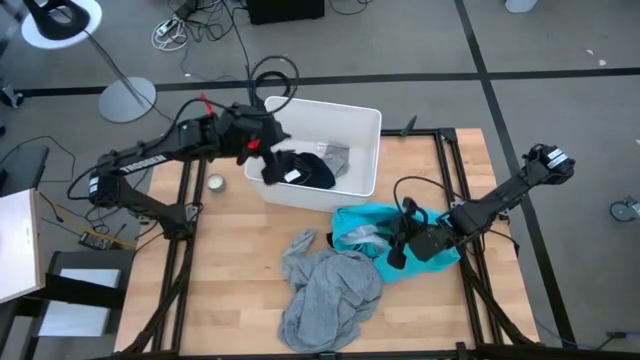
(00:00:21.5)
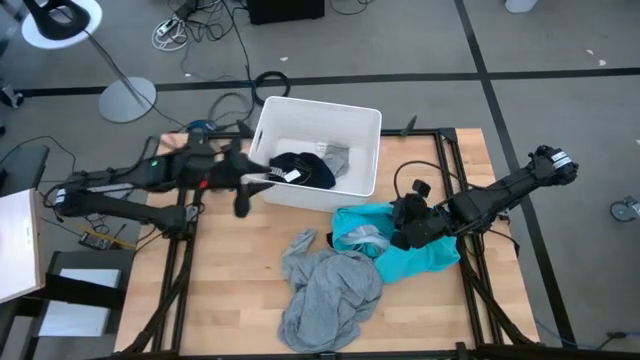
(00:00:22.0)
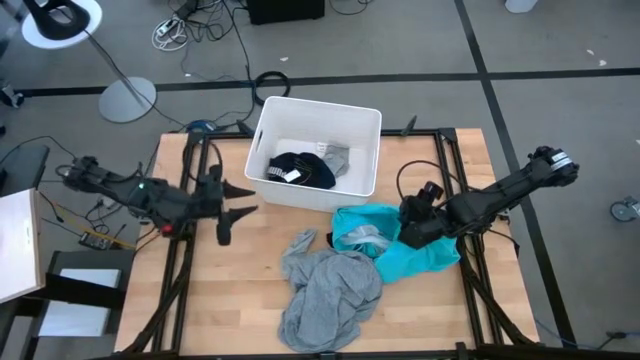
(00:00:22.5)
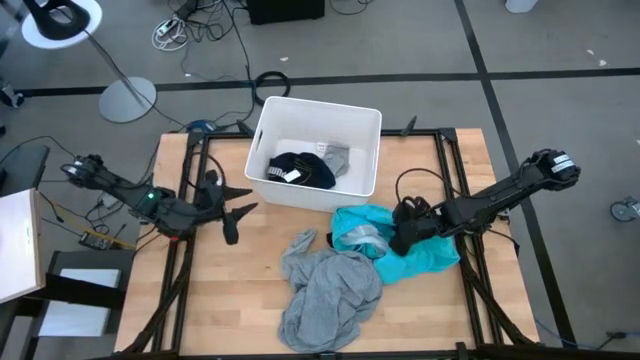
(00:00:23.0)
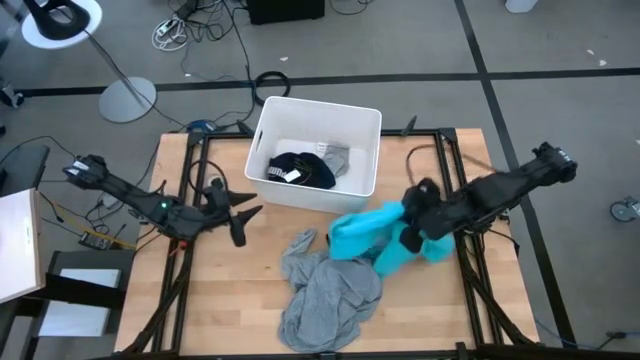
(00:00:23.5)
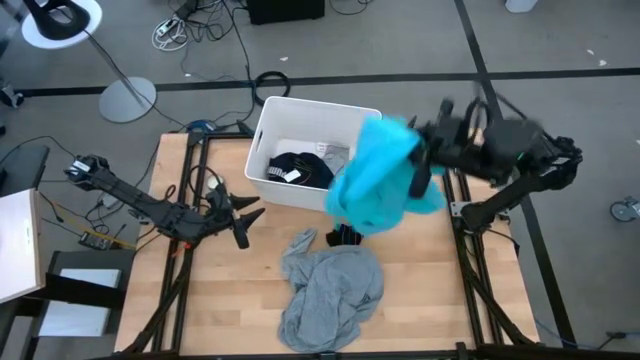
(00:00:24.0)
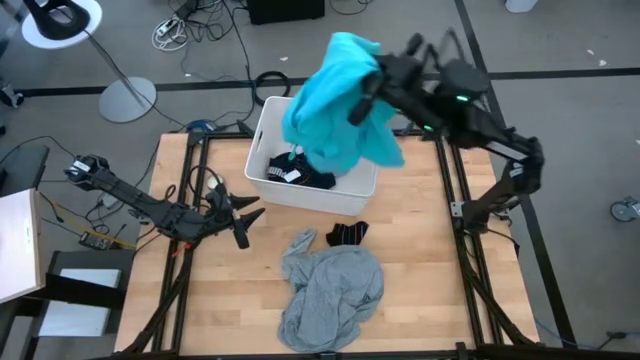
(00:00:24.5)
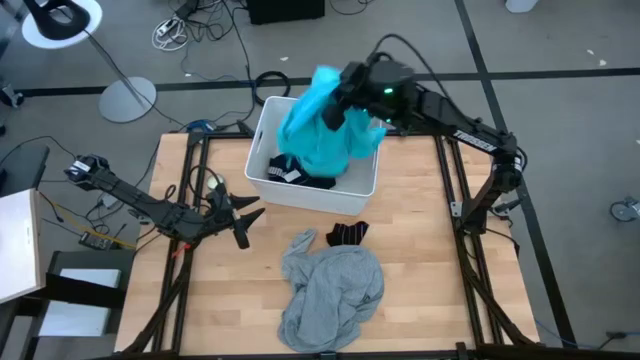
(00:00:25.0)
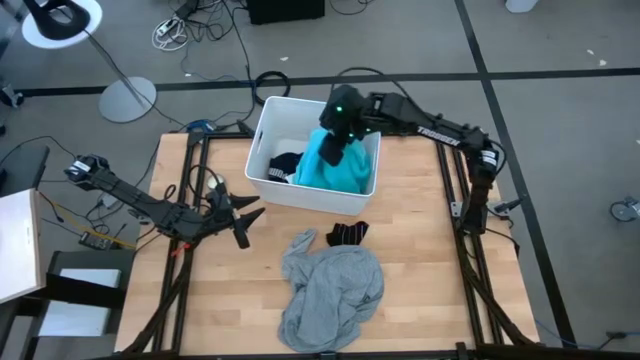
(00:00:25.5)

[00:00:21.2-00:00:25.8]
Task: Sort clothes
Put the light blue shorts into the laundry bin

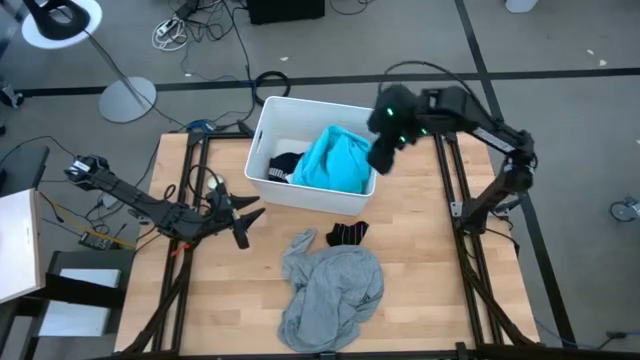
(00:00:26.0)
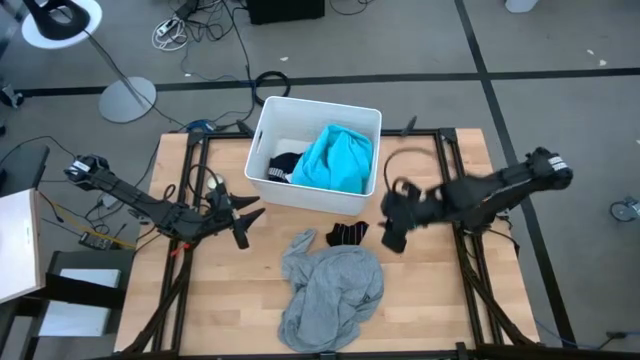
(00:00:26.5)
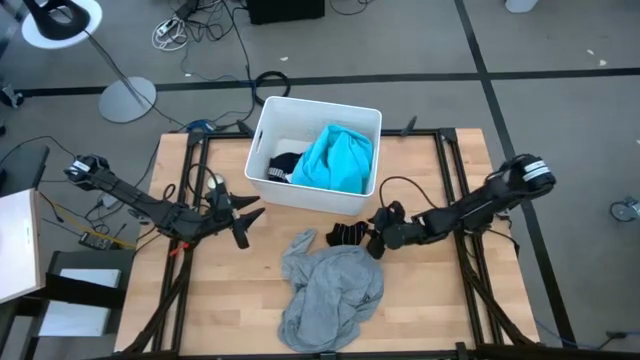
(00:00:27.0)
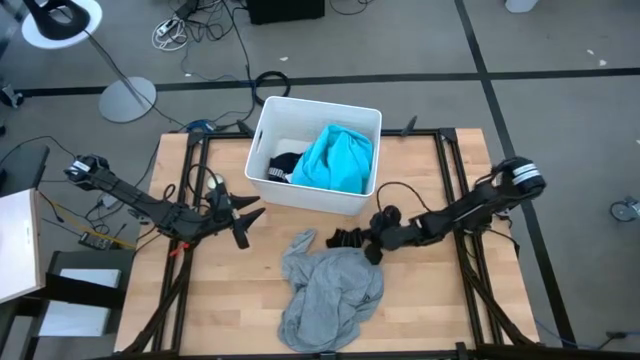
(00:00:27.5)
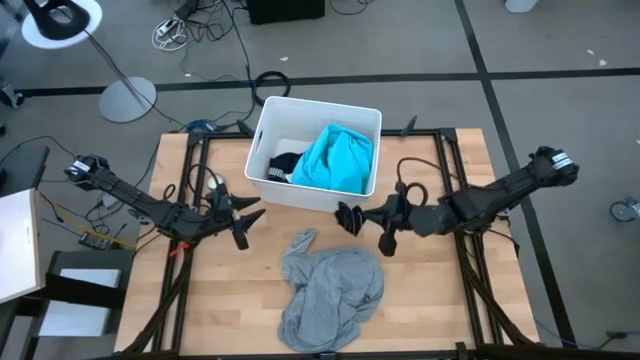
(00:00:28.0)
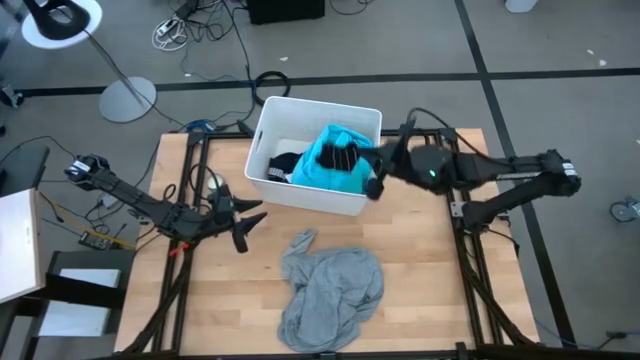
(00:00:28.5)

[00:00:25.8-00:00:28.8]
Put the black sock into the laundry bin

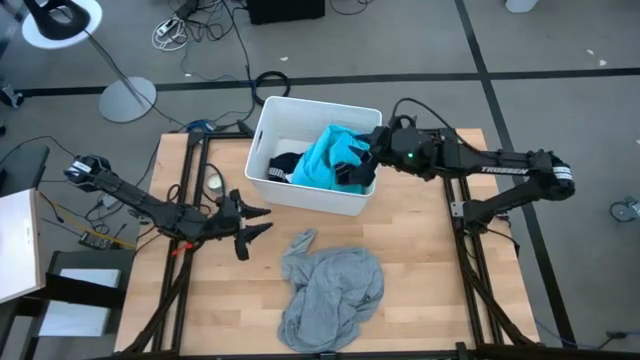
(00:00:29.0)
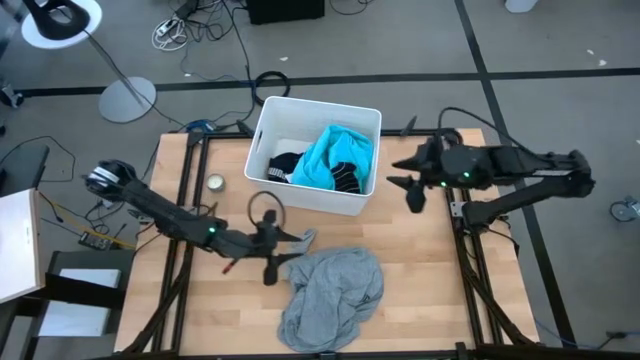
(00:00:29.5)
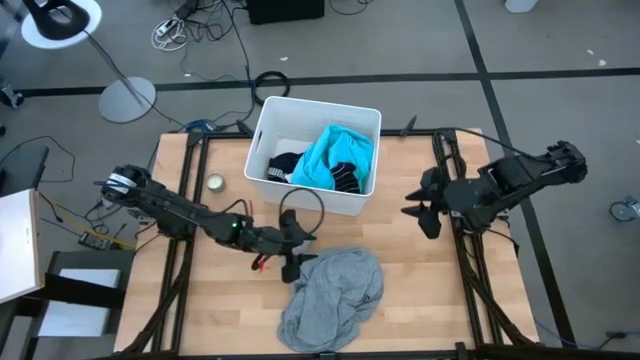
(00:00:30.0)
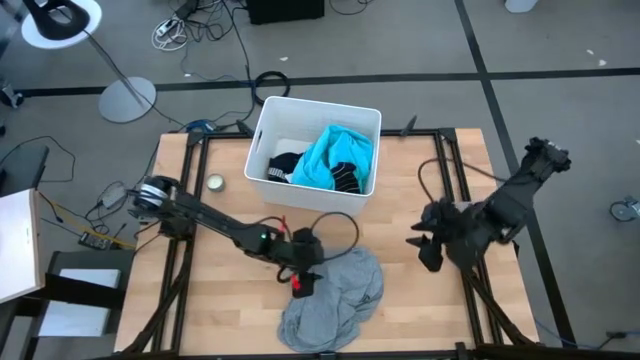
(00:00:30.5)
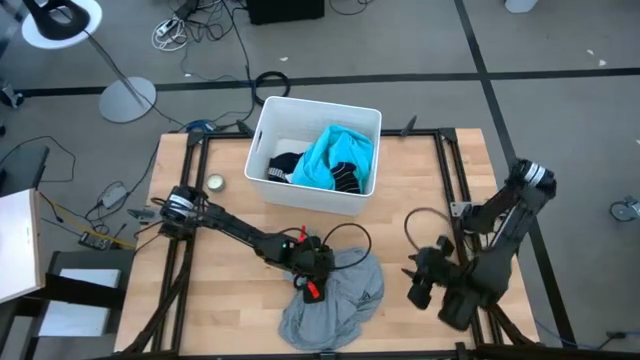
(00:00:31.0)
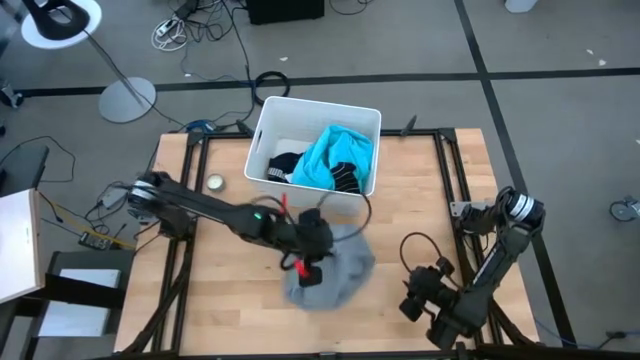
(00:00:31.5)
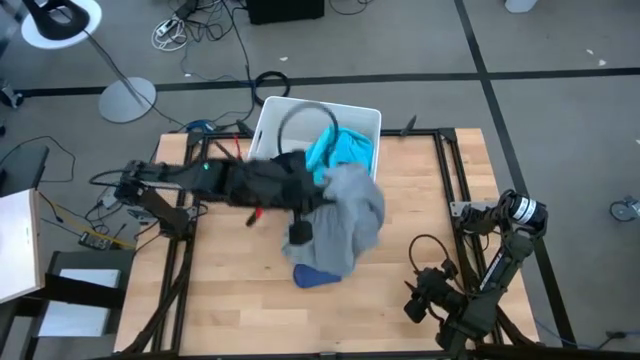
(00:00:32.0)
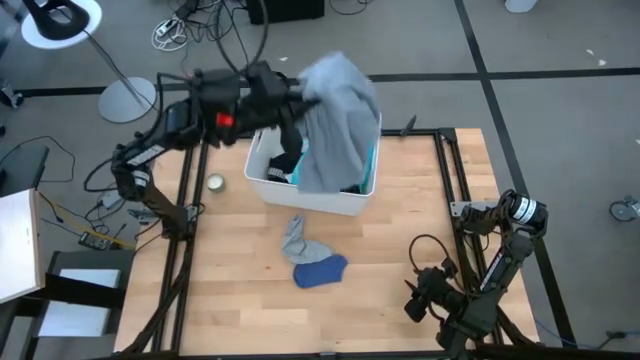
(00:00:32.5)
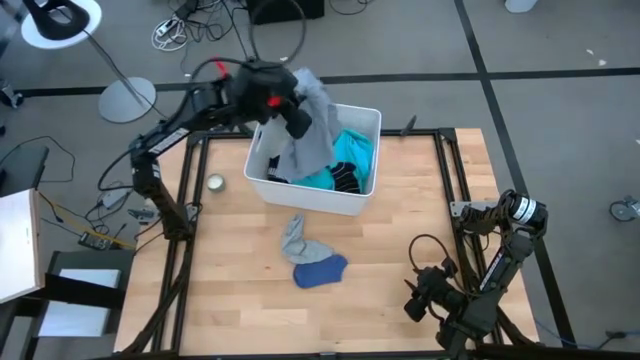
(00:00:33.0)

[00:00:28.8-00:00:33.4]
Put the gray shirt into the laundry bin

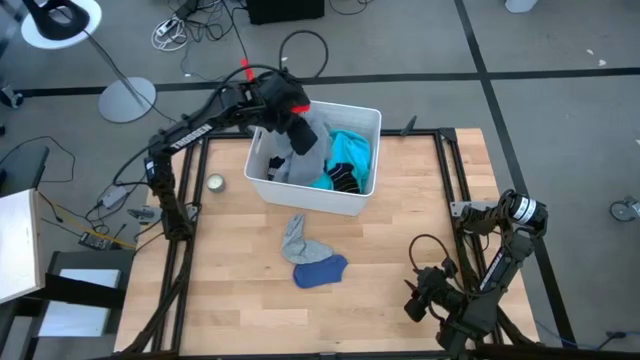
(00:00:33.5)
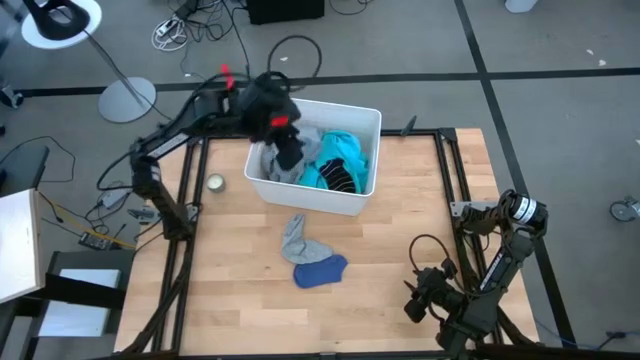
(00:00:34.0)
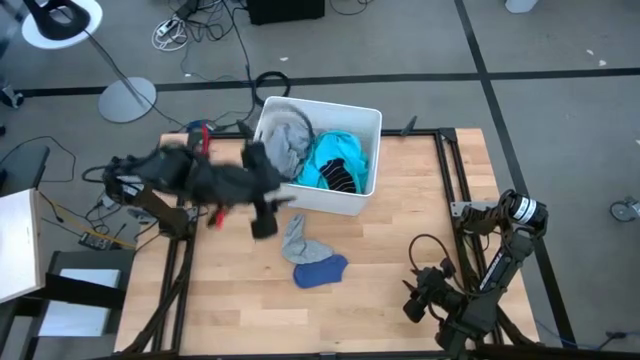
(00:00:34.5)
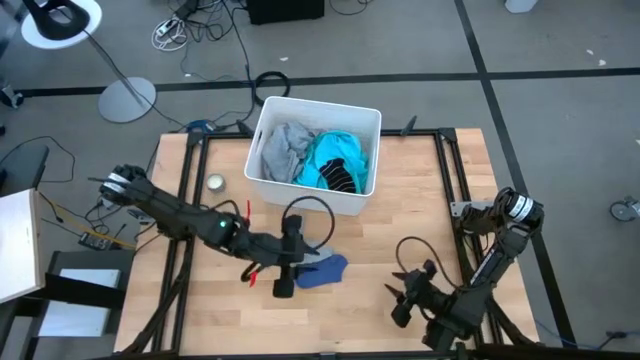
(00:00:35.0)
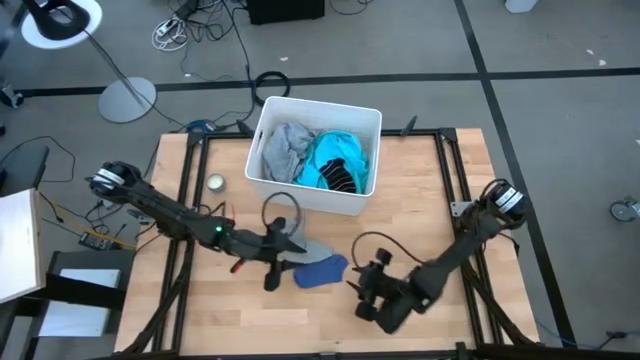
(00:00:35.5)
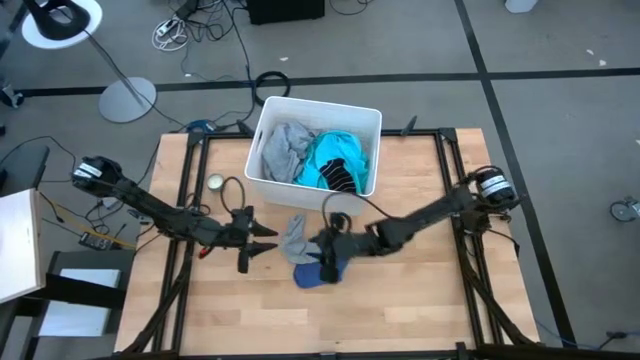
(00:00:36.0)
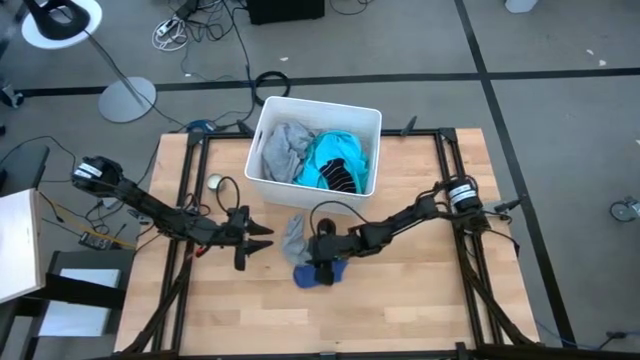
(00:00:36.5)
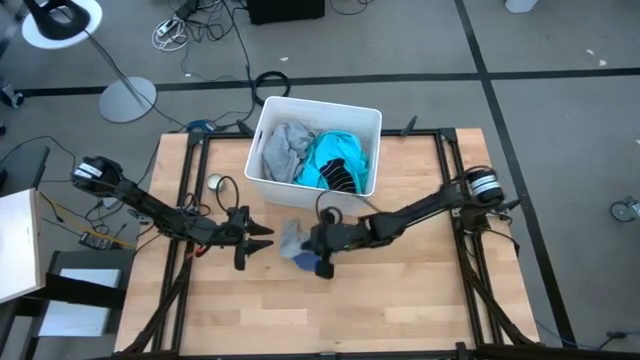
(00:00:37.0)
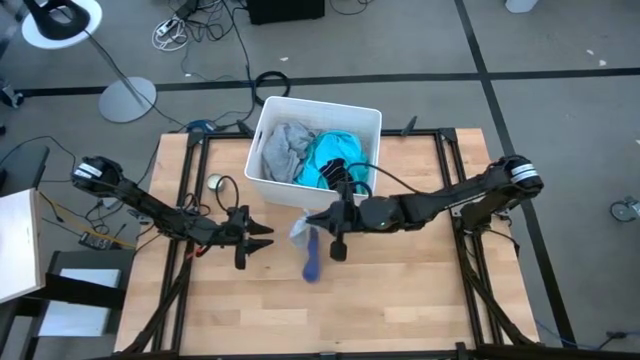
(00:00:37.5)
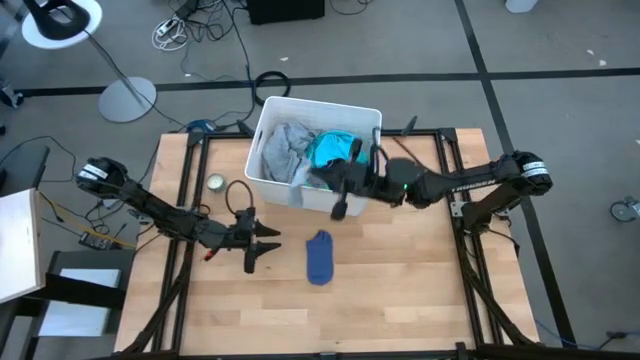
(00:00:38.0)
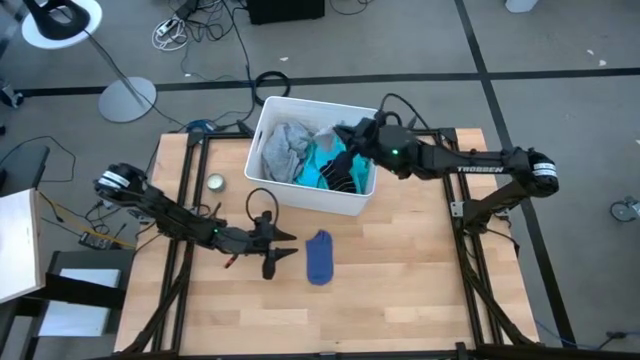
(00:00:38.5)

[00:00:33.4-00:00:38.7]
Put the gray sock into the laundry bin

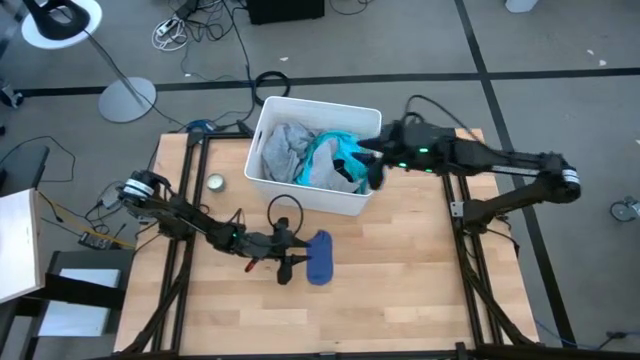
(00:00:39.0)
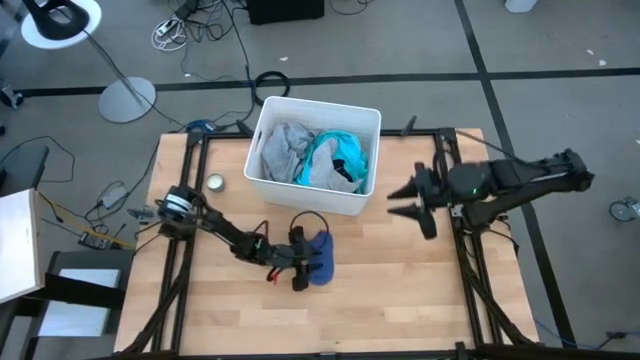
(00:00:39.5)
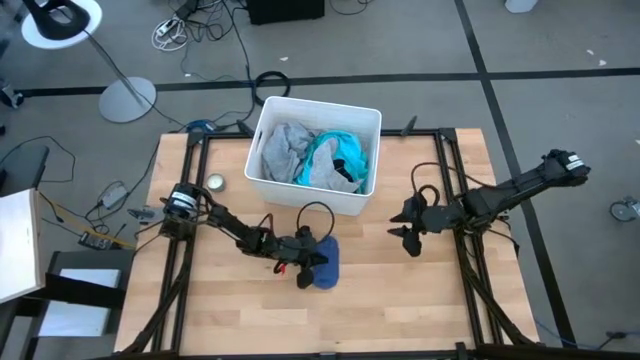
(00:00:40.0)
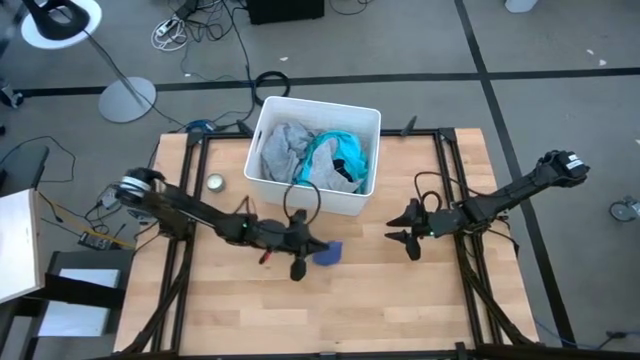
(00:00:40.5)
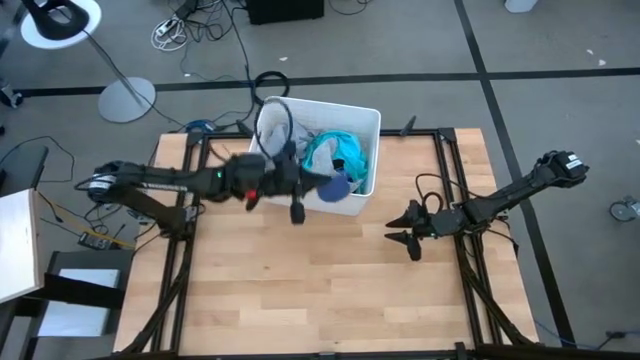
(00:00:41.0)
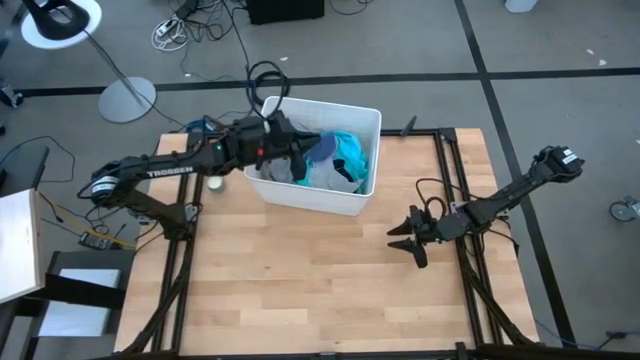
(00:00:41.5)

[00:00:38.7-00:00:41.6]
Put the blue sock into the laundry bin
